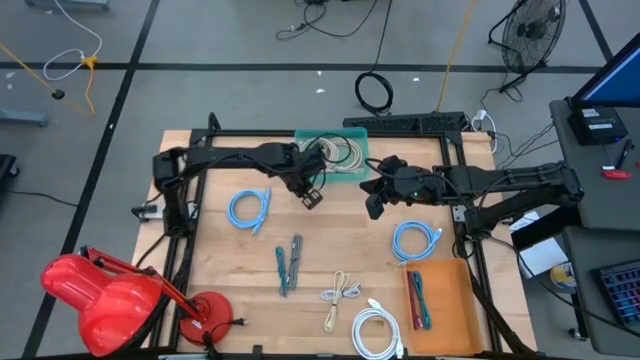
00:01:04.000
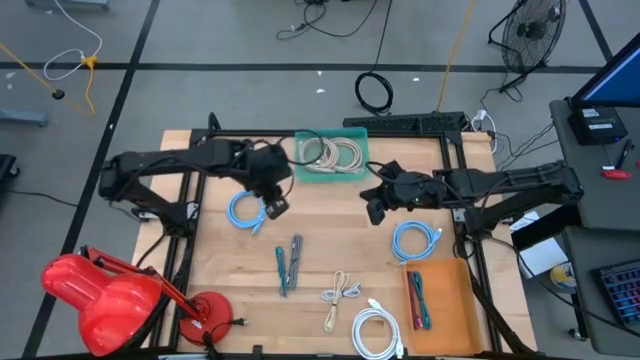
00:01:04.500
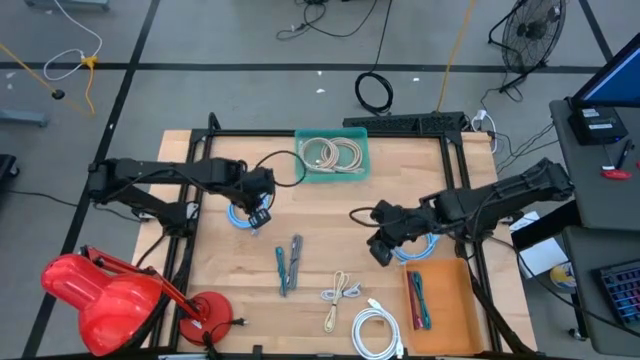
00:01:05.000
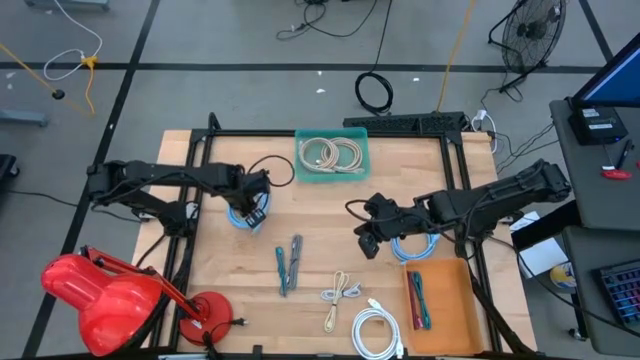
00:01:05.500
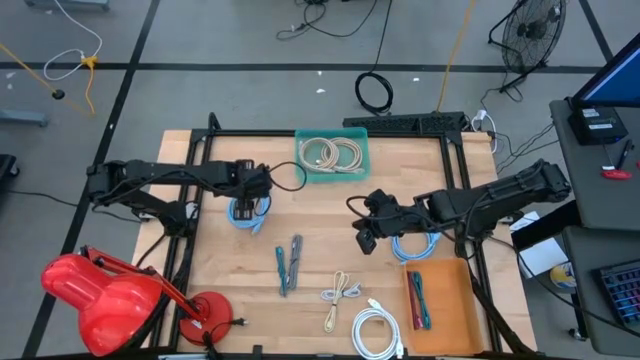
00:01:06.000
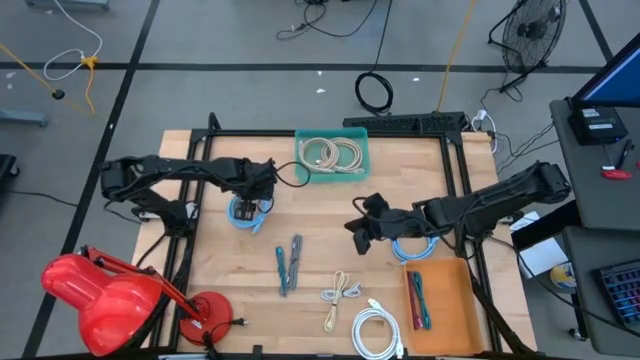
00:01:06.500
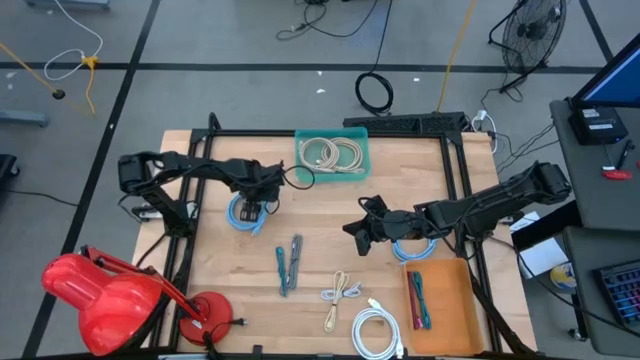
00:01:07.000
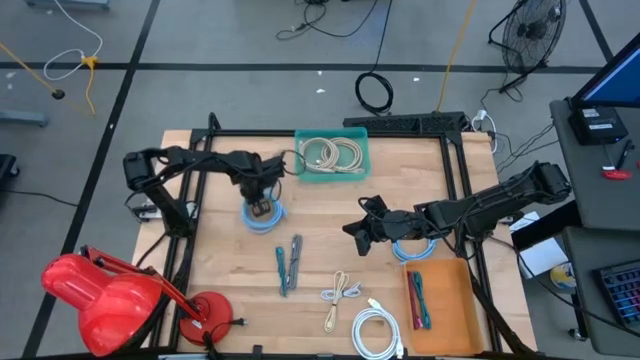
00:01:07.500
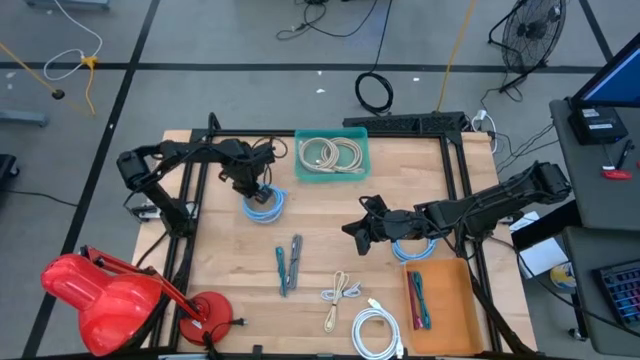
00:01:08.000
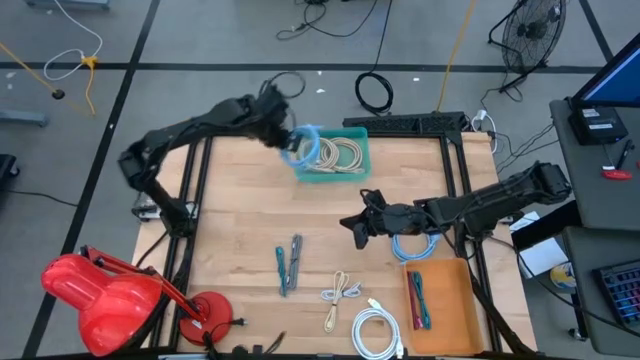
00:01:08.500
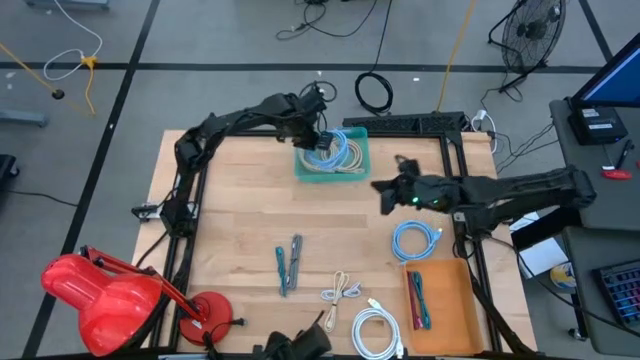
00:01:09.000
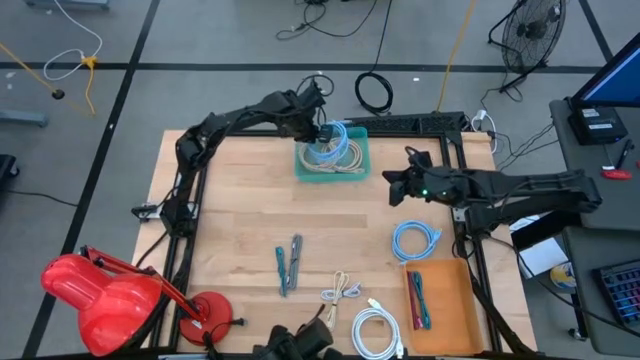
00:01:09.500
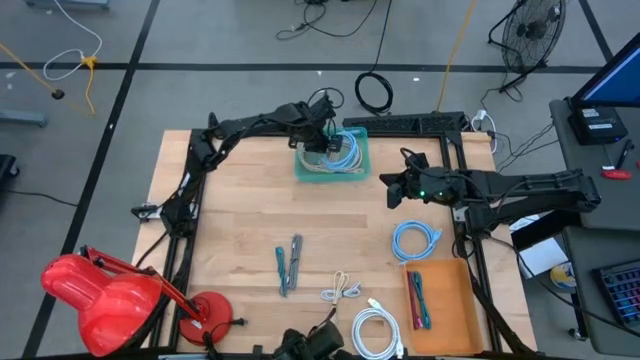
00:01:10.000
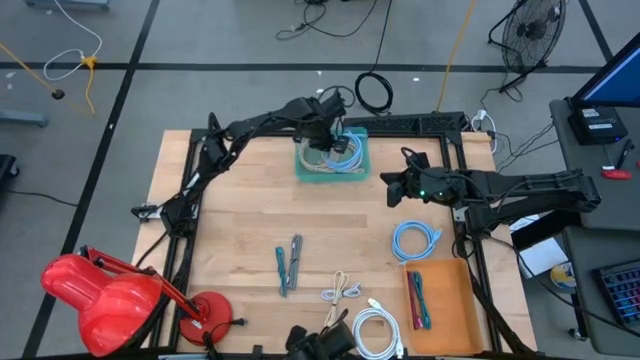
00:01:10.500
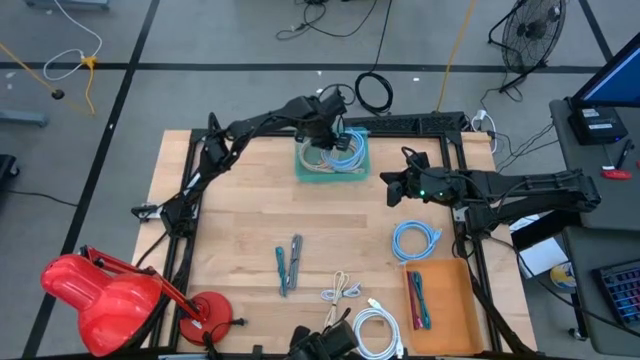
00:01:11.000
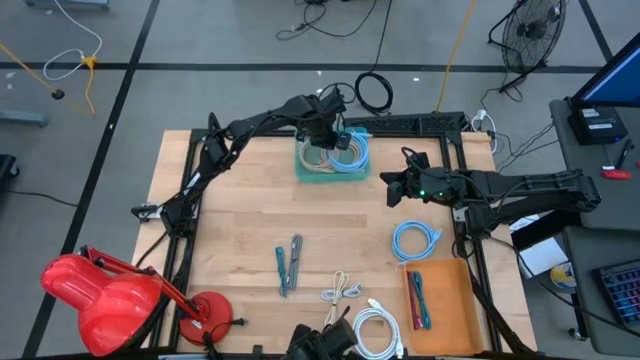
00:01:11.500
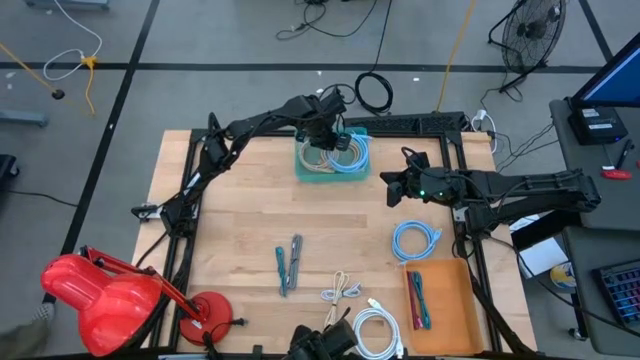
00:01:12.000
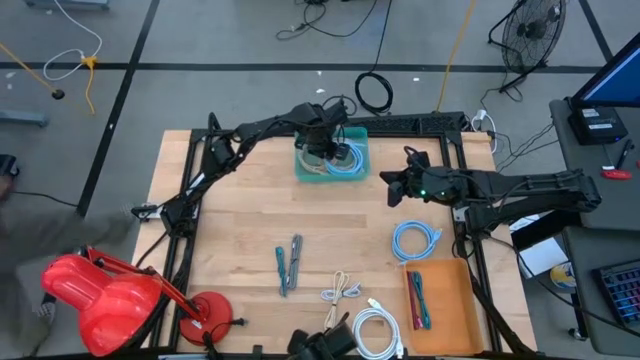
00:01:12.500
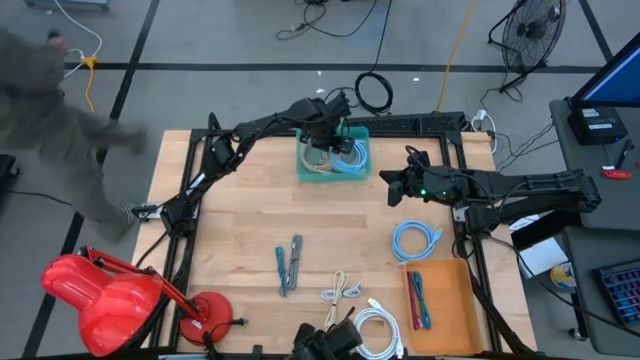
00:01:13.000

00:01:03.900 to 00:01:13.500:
Task: Pick & Place USB Port
Put the left blue display cable into the blue bin

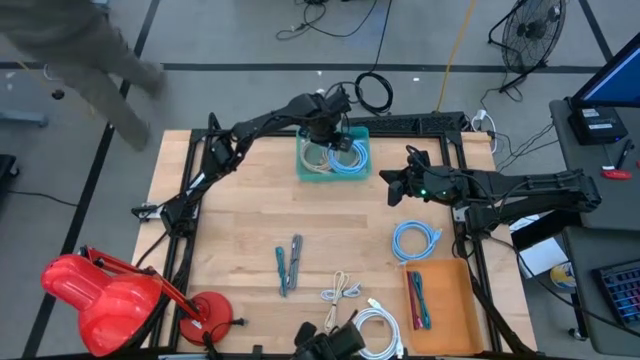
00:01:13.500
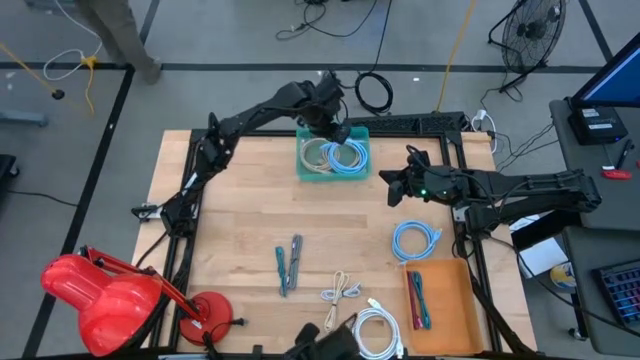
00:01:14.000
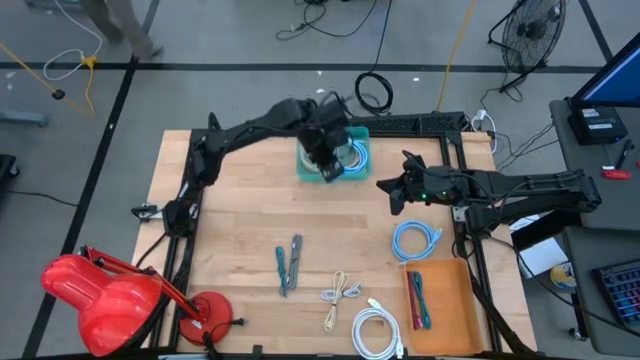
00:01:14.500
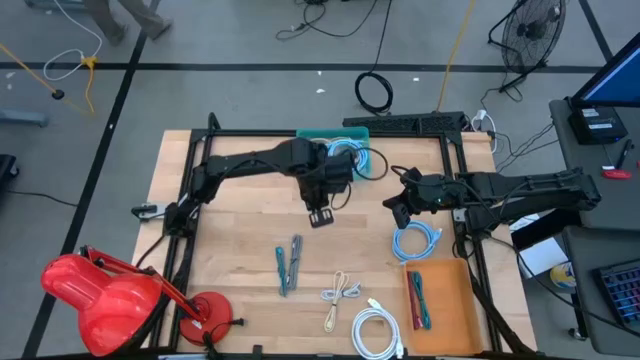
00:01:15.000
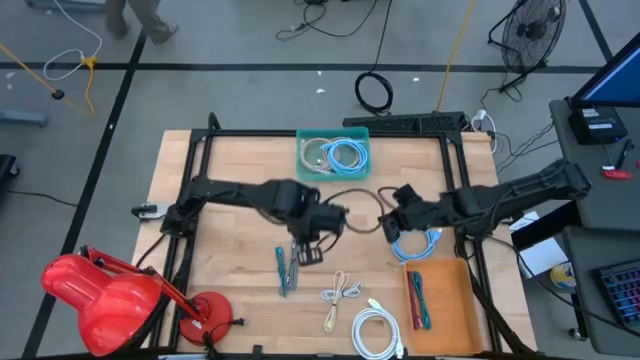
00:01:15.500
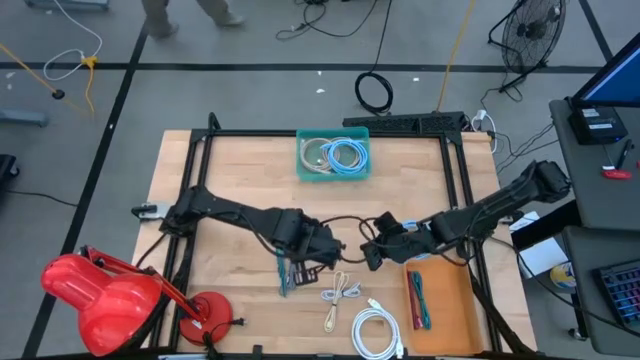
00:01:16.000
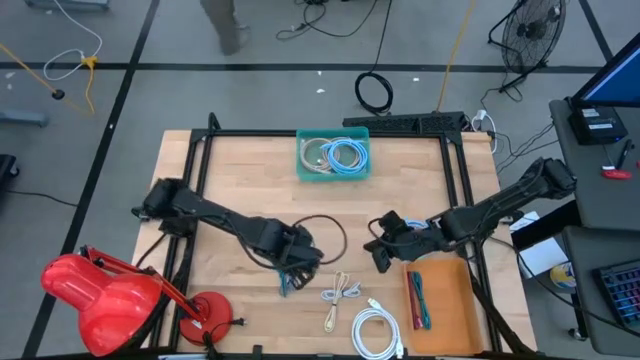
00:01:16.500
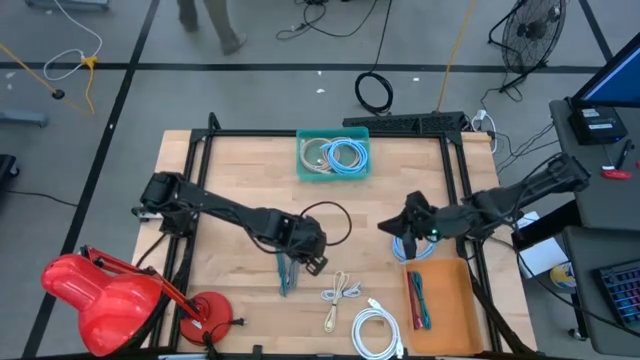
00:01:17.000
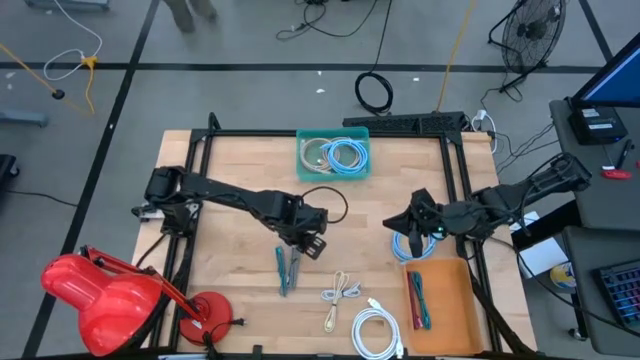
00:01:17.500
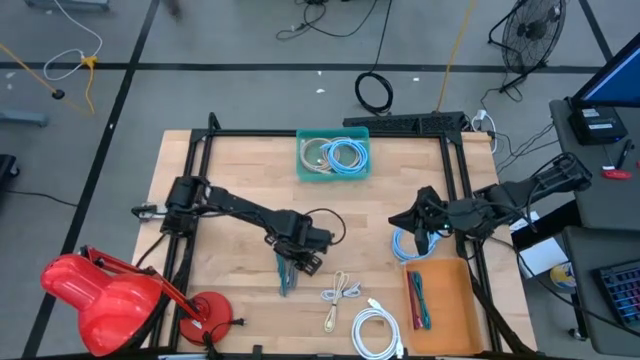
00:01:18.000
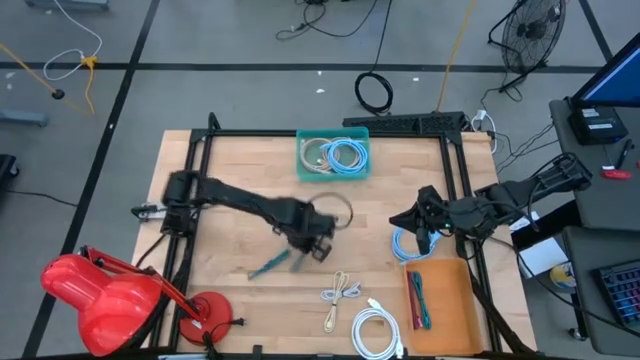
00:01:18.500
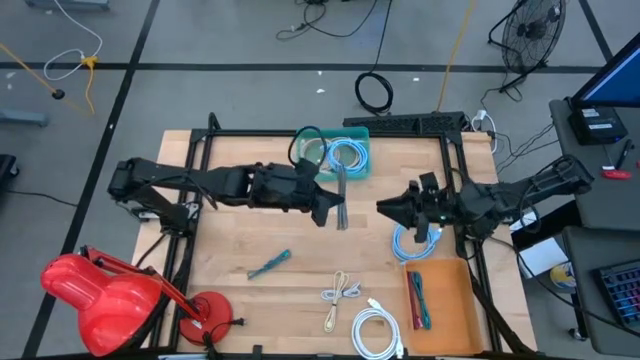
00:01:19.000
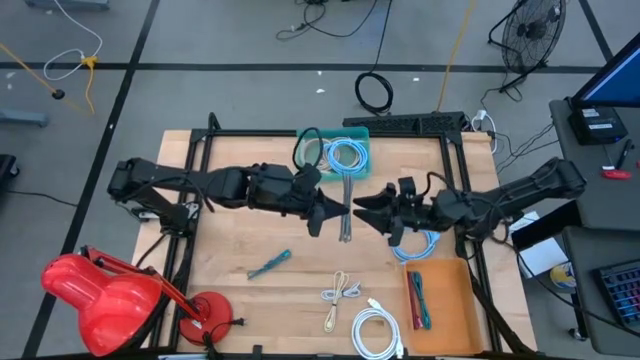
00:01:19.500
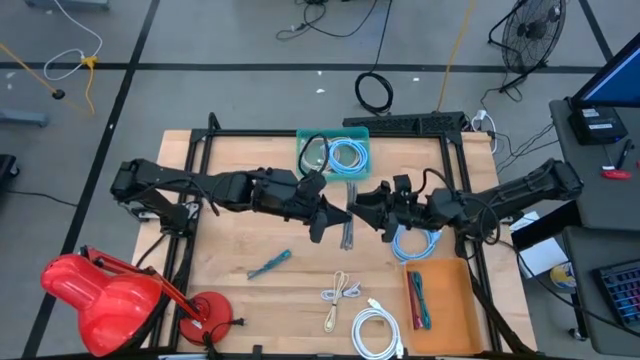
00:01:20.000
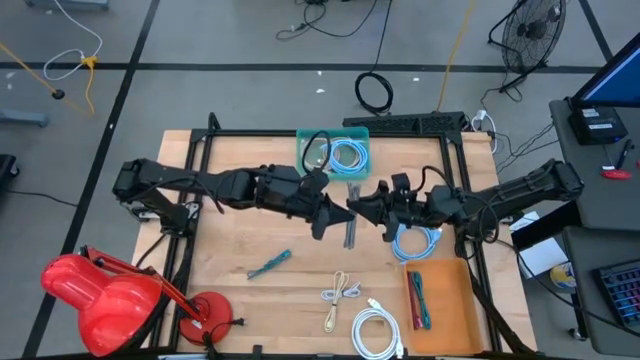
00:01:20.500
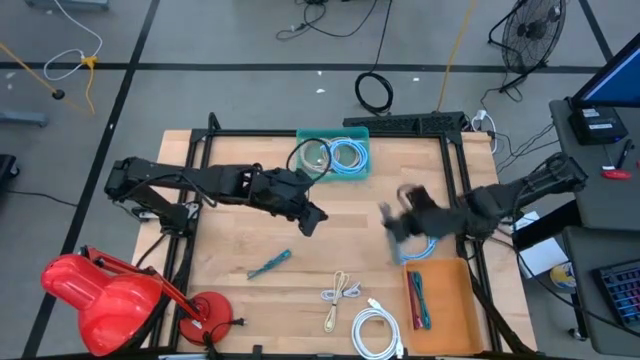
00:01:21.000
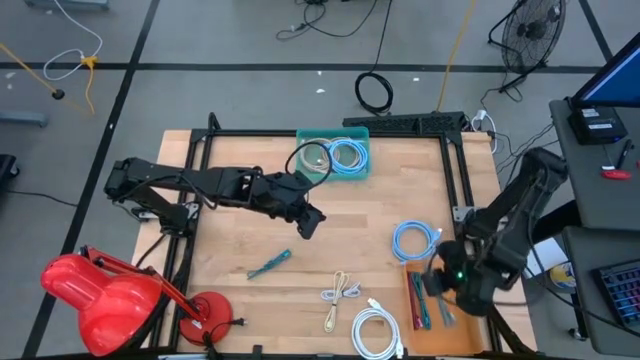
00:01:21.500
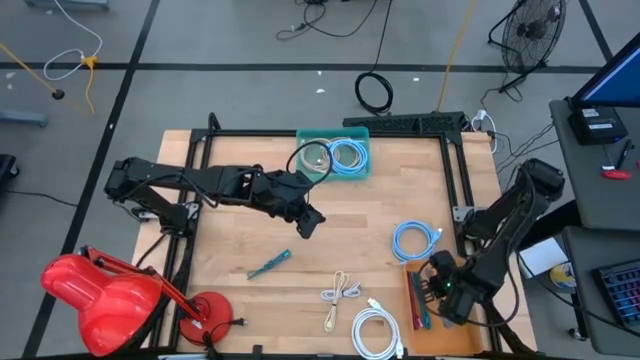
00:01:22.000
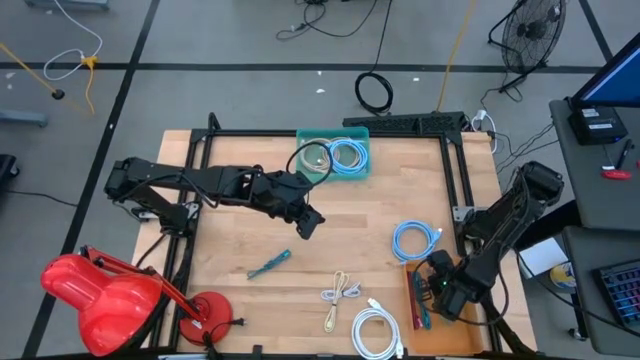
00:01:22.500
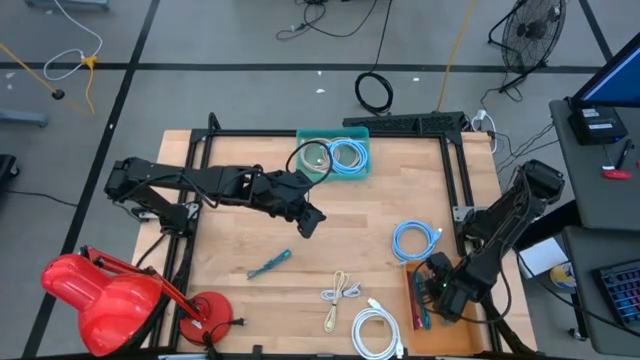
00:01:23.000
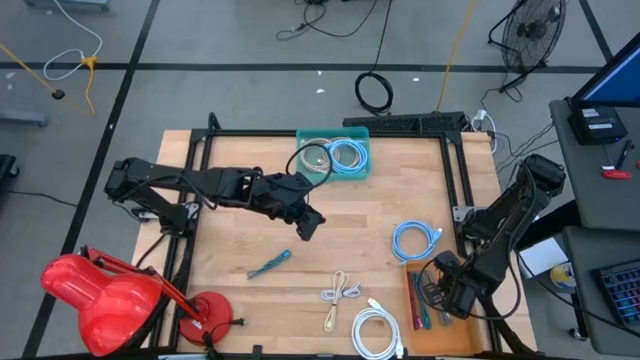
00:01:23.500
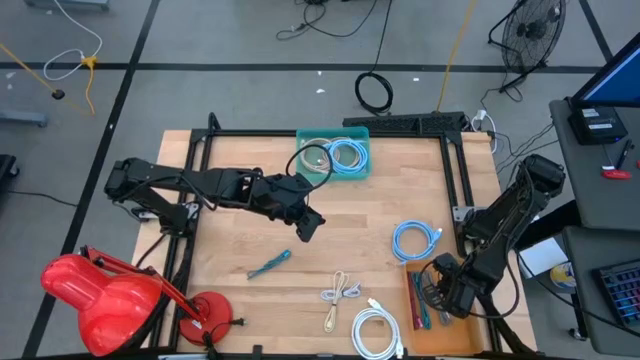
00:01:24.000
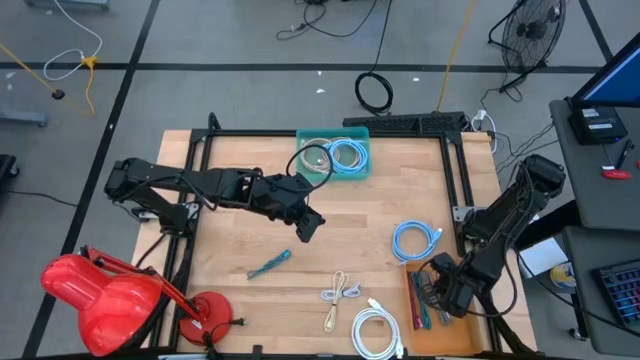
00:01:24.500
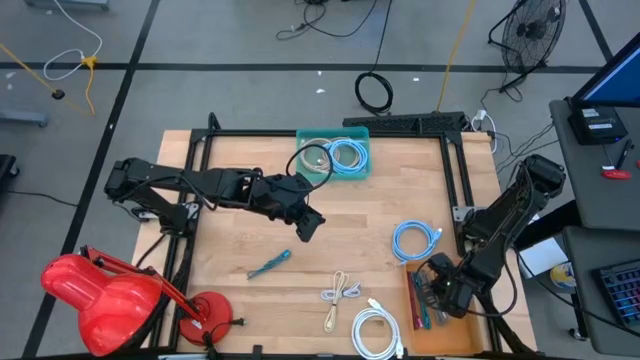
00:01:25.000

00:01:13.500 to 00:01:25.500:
Put the black charger cable into the orange bin

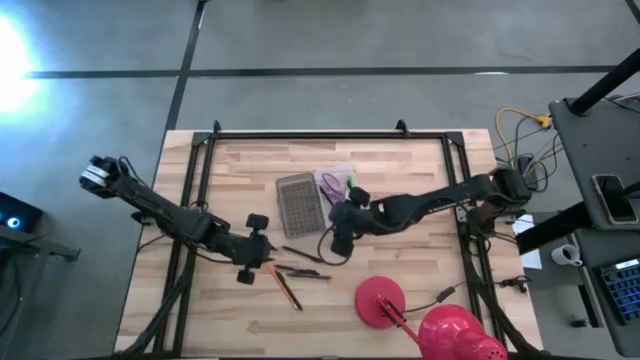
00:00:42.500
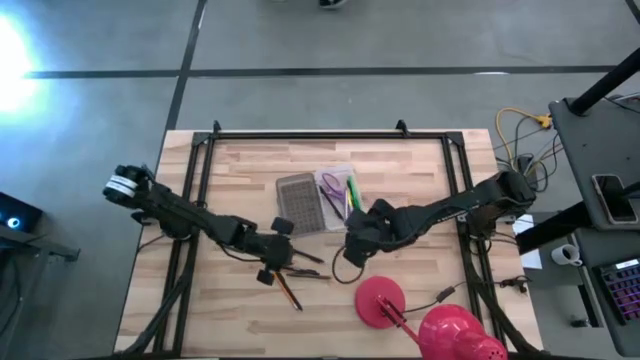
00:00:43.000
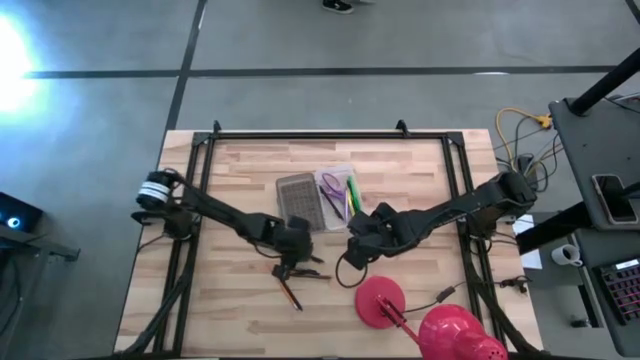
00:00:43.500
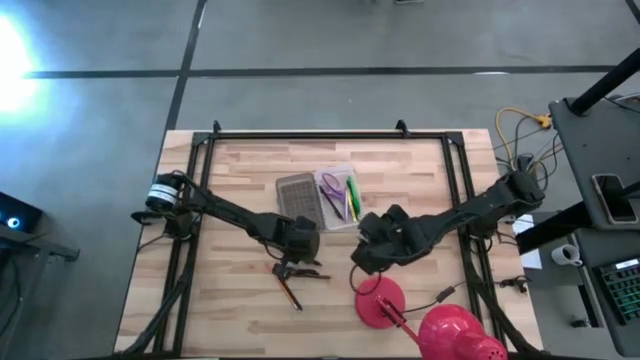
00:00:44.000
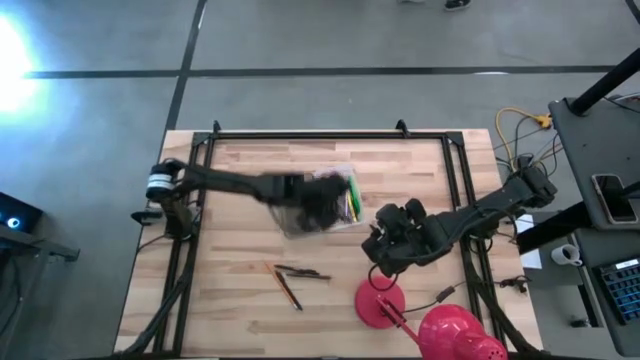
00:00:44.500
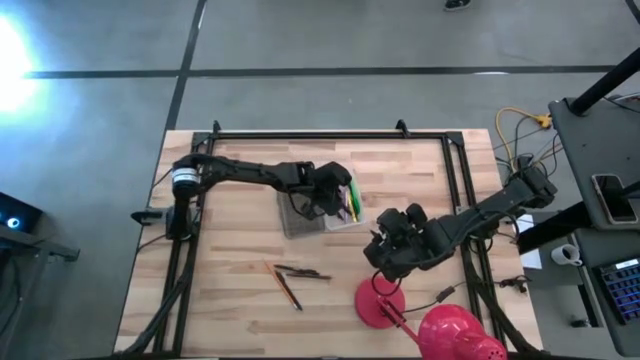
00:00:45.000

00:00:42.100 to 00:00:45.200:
Task: Pick & place school supplies into a supply box
Put the black pen into the black supply box
